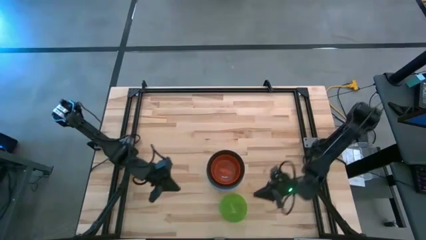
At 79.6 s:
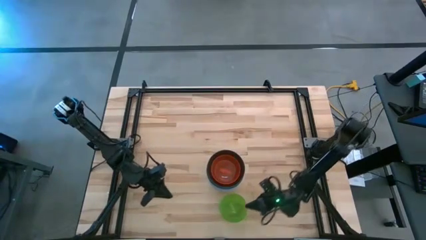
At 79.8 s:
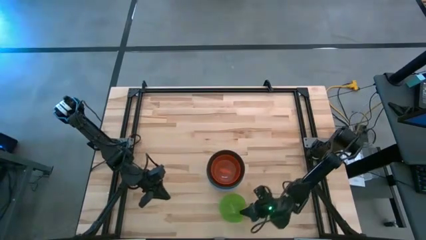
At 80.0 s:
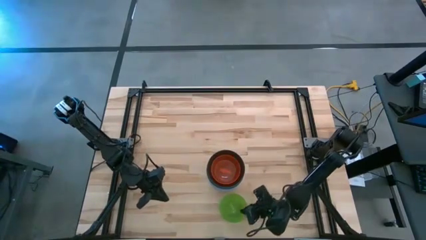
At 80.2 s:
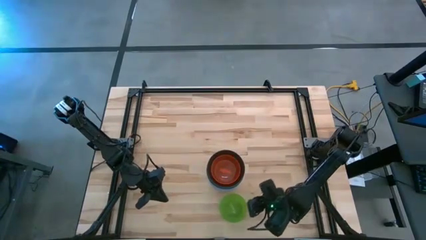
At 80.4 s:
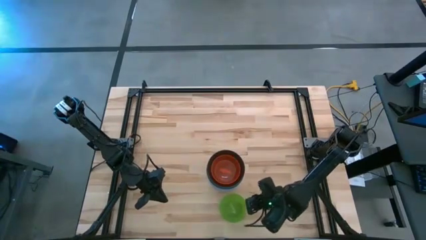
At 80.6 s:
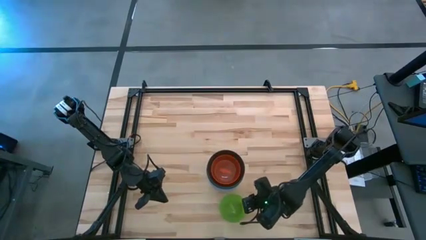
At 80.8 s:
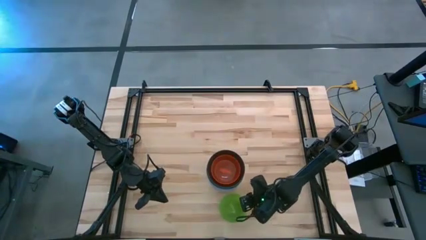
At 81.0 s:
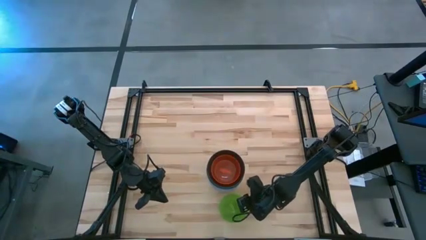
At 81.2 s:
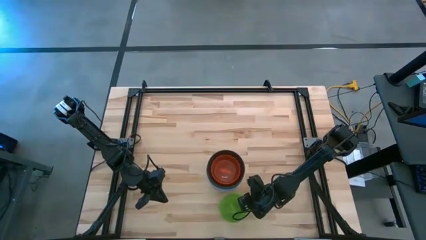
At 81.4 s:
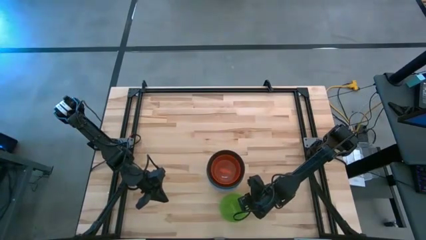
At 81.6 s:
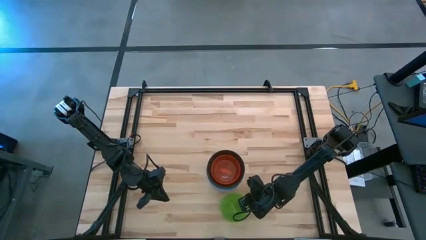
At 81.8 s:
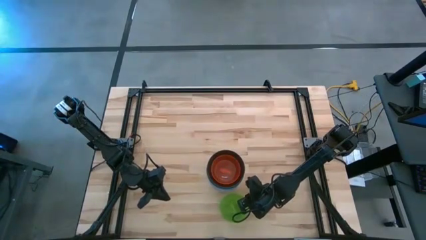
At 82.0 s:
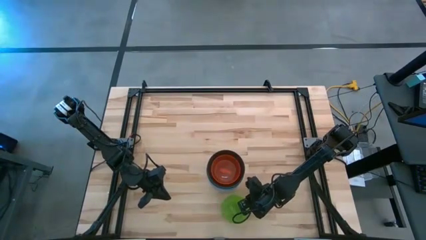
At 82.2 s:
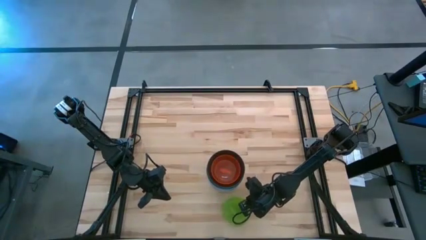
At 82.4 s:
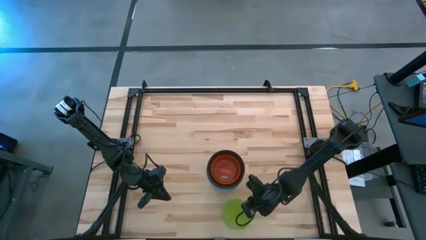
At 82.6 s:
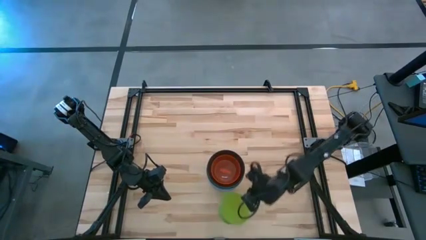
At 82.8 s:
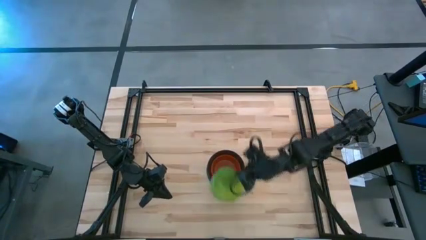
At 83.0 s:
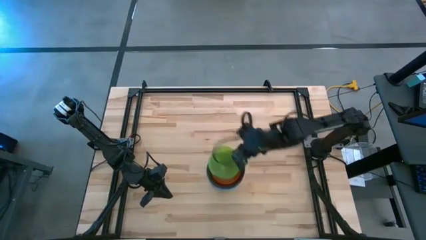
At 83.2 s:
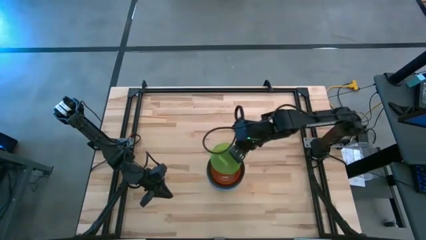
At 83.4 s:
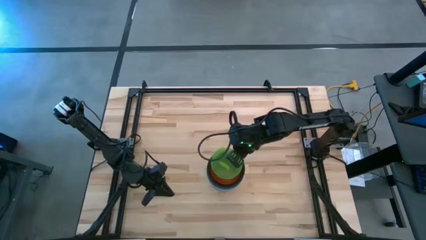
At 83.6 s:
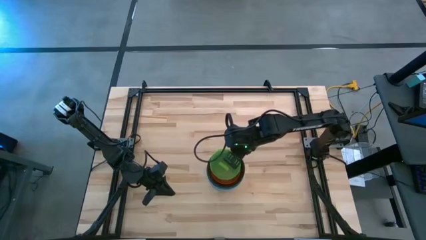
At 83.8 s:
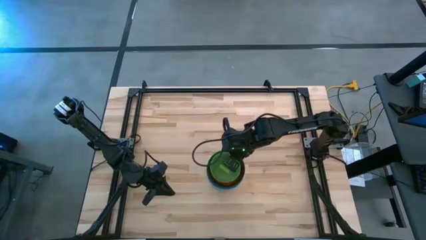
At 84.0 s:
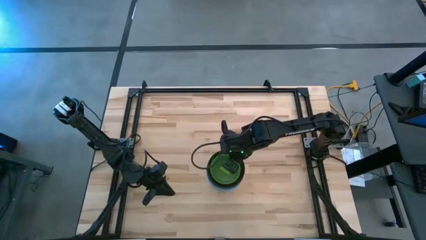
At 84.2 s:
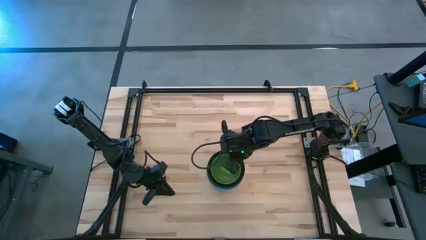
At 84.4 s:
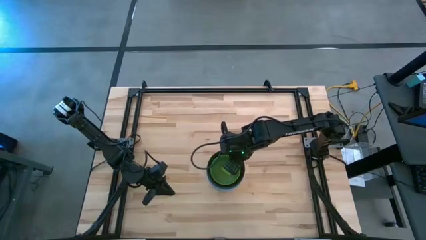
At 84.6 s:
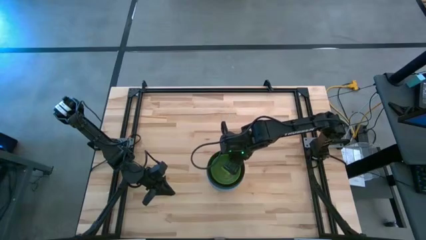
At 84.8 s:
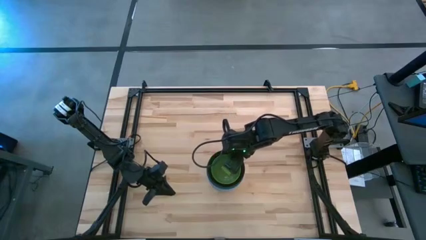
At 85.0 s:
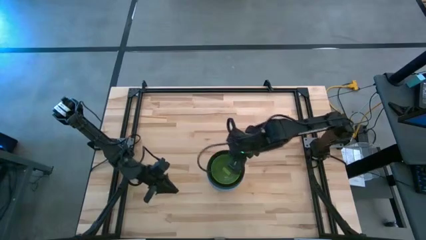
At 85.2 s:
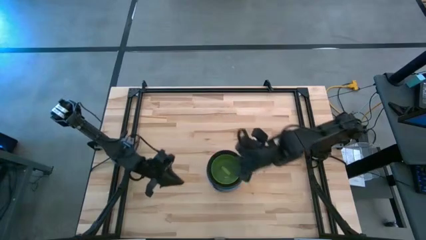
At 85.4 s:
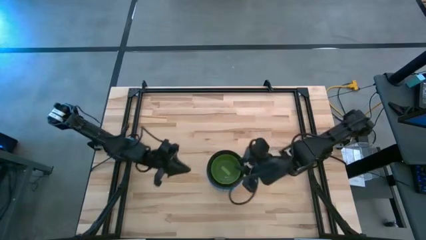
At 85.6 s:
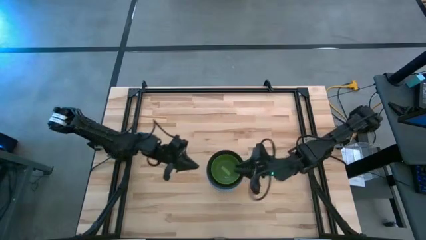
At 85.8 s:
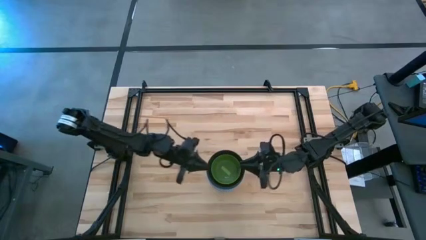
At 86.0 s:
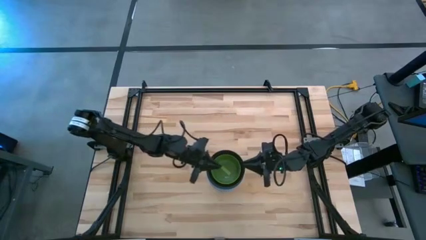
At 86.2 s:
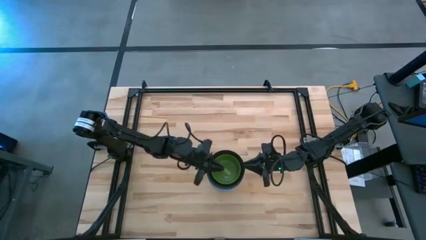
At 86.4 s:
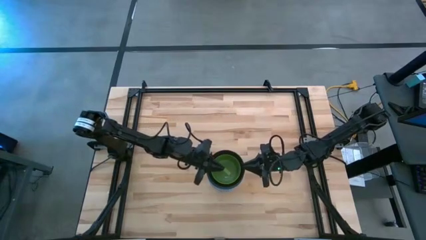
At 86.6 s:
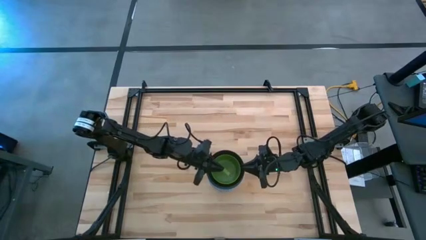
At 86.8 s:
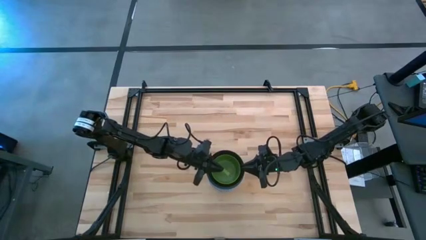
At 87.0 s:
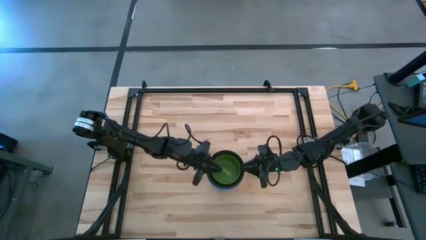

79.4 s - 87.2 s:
Task: Nest bowls inside each other
Stack the green bowl on top of the orange bowl

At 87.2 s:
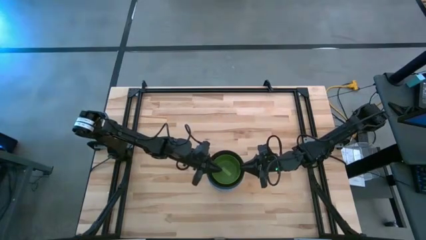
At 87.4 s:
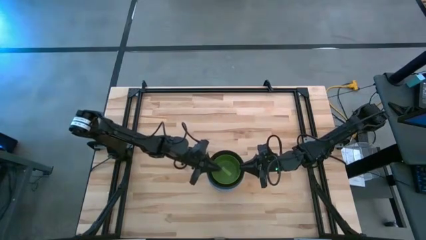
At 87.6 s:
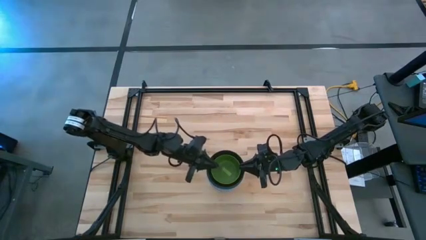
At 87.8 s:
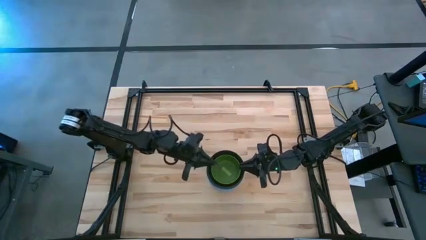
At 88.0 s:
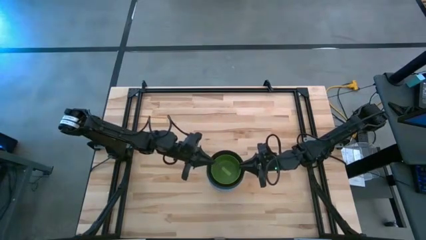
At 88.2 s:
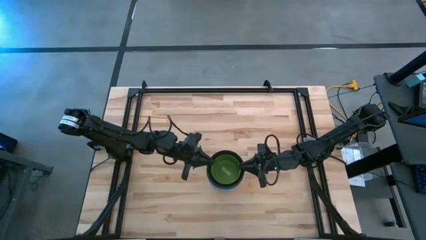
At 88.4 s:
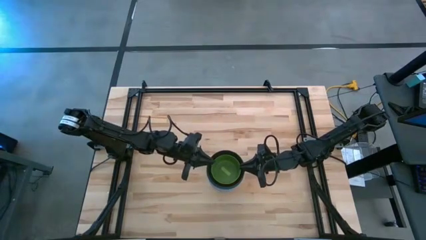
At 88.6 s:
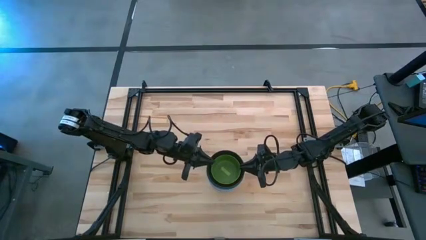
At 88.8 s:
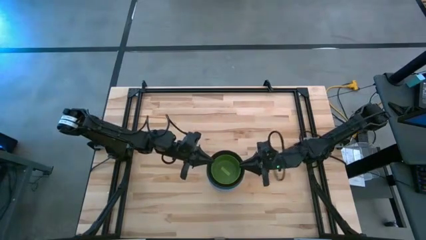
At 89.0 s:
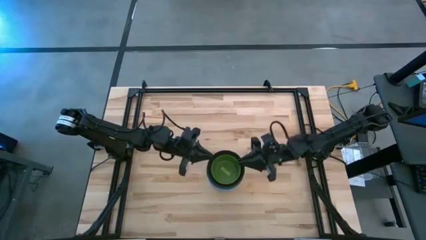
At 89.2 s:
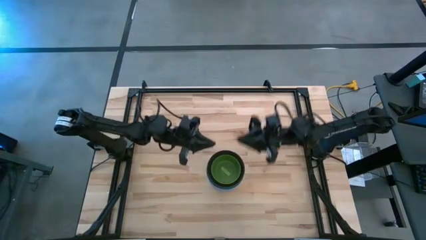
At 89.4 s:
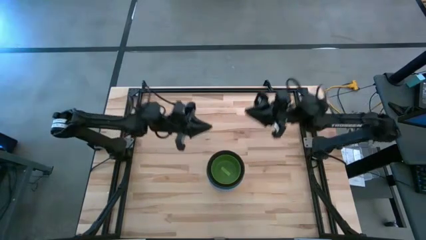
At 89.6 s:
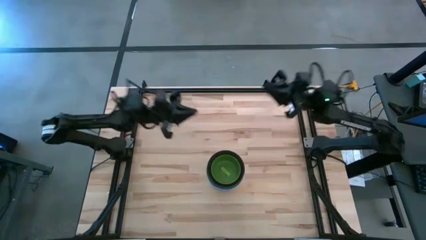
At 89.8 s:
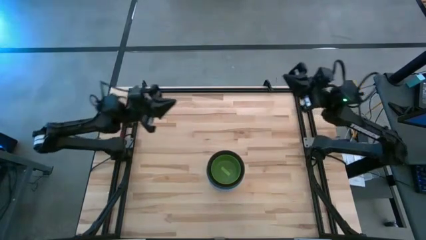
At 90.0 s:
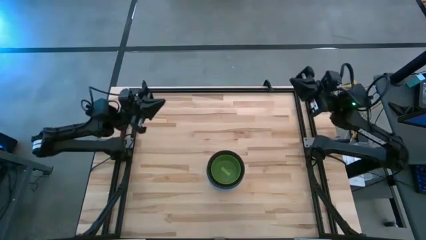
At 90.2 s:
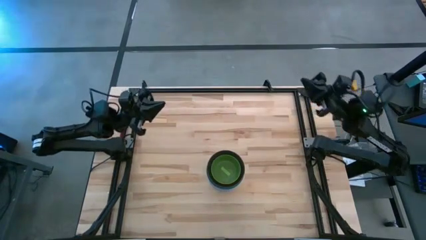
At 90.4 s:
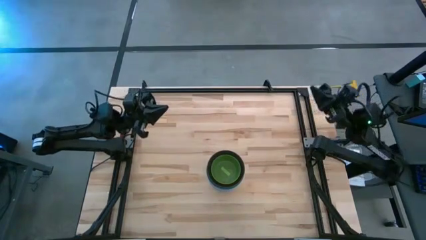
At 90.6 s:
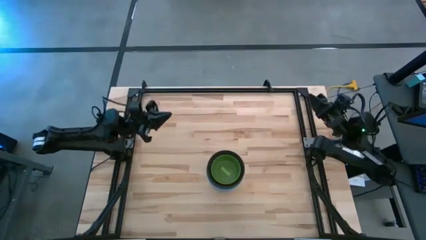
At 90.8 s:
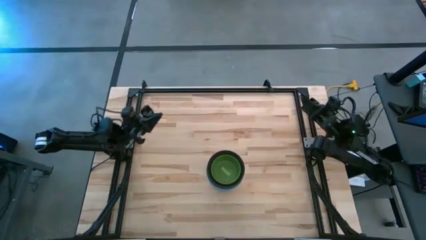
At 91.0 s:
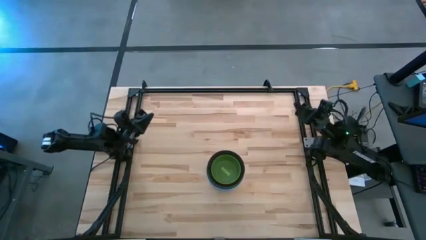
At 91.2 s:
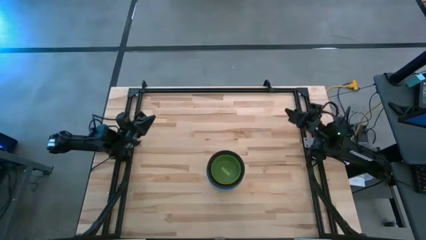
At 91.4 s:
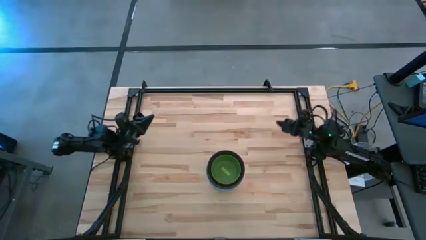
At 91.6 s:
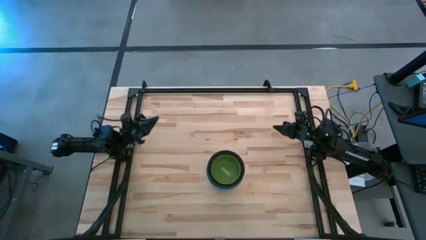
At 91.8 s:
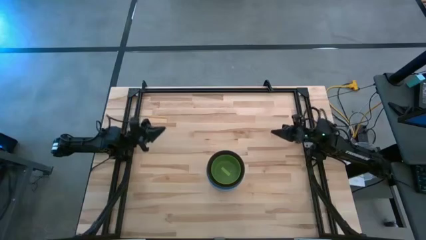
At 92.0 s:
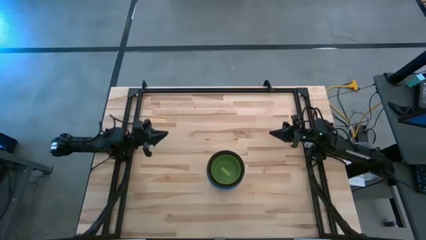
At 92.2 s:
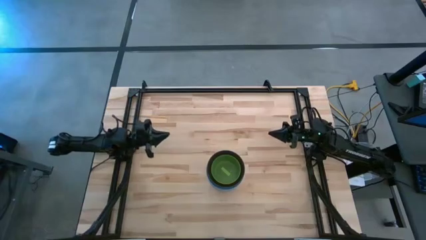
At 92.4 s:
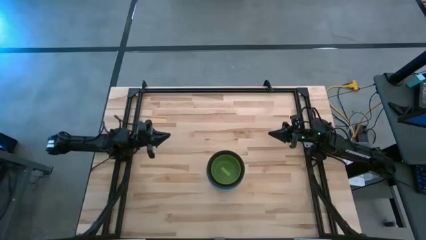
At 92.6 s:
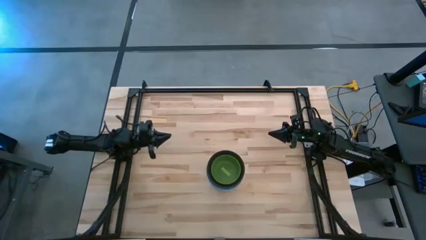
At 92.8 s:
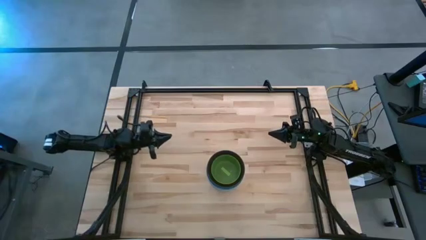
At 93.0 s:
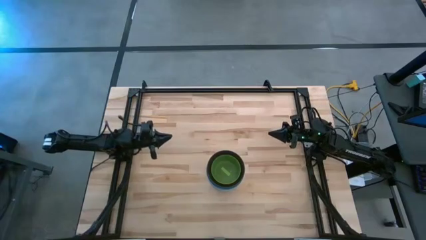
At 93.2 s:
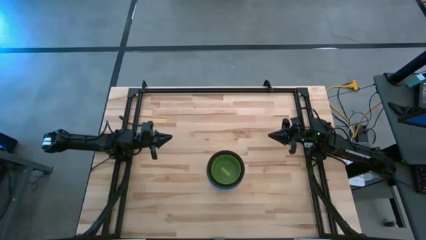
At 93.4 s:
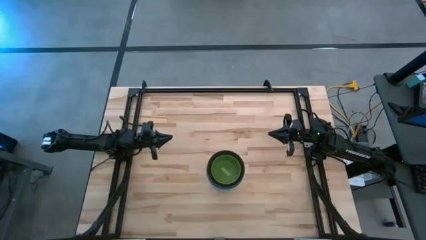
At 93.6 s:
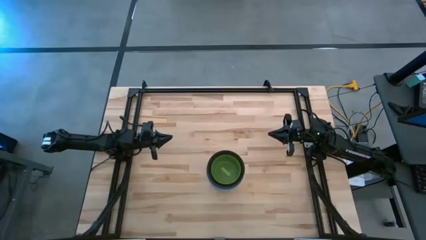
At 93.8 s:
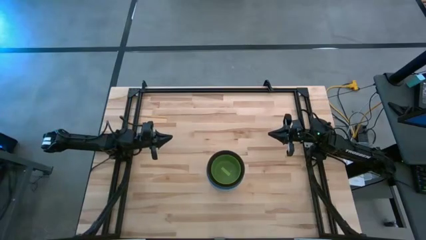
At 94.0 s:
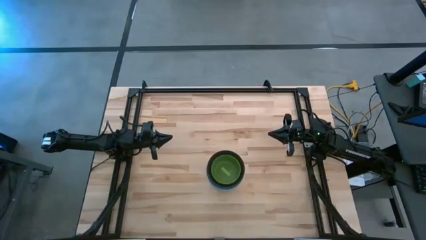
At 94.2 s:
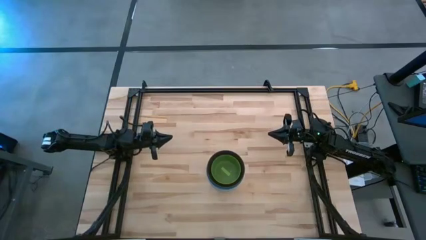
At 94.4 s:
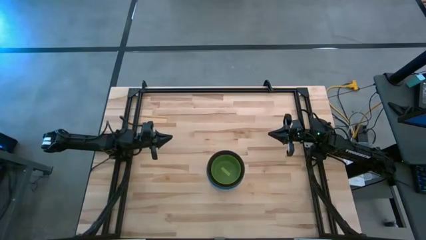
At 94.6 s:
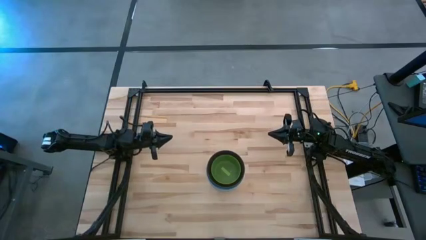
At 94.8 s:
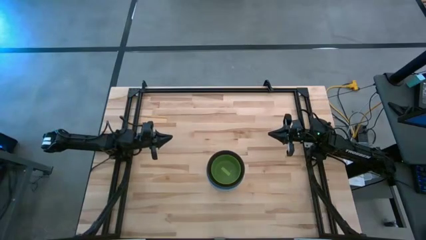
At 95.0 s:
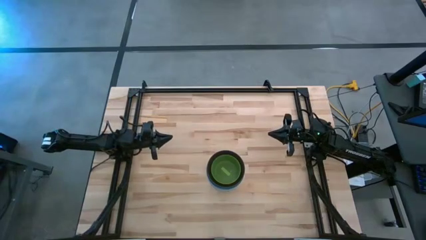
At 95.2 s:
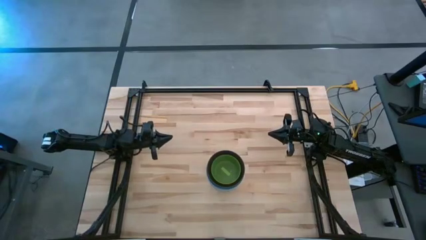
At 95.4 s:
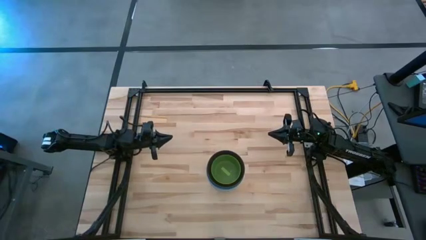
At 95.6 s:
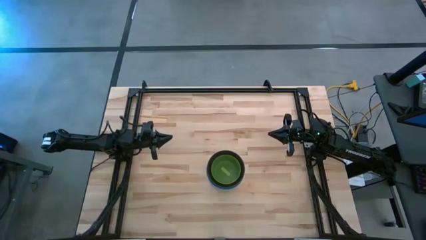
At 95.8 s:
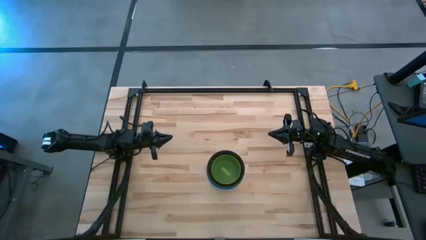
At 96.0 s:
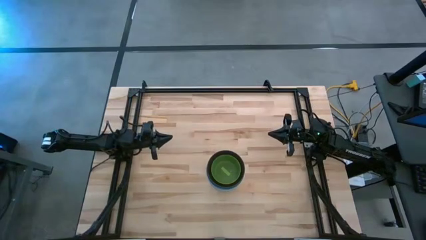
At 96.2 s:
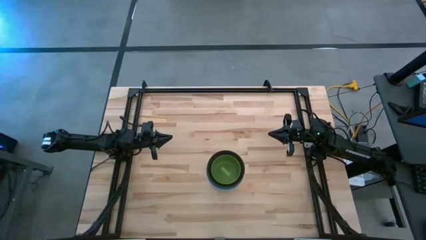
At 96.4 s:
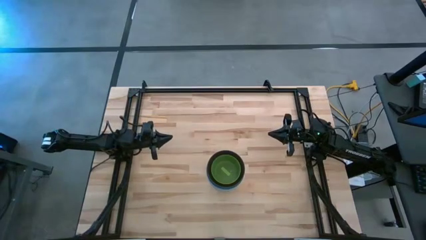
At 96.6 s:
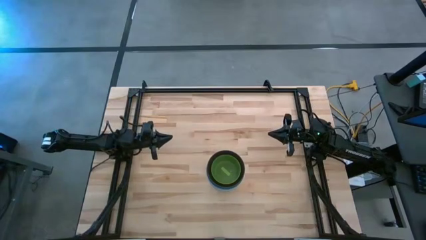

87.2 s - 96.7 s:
Return to Home Position
